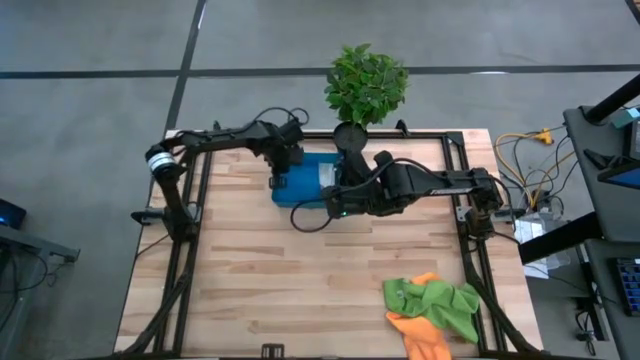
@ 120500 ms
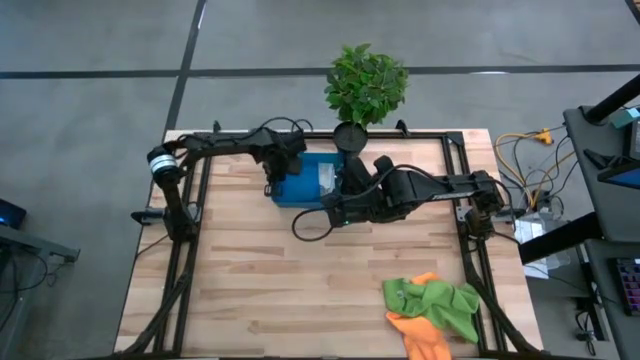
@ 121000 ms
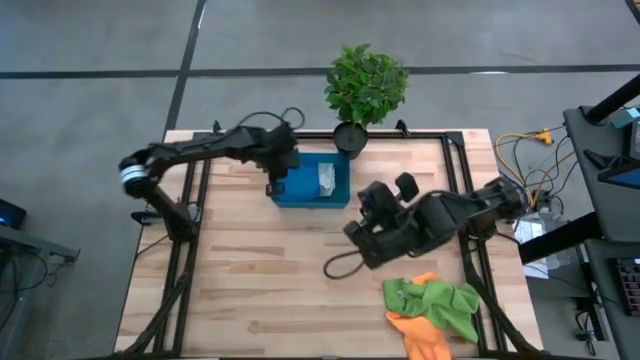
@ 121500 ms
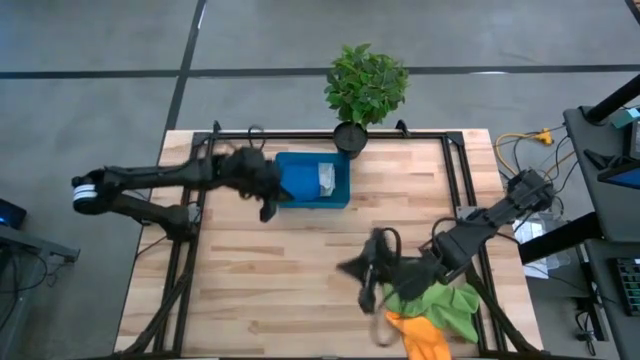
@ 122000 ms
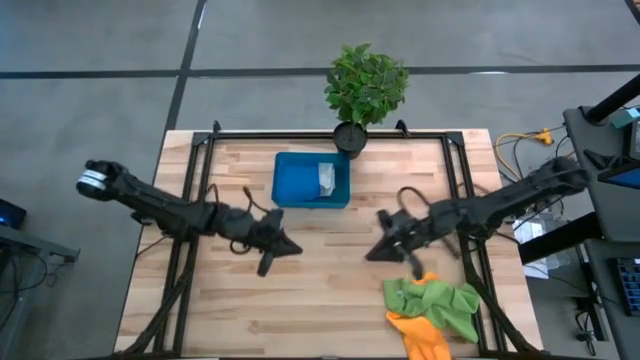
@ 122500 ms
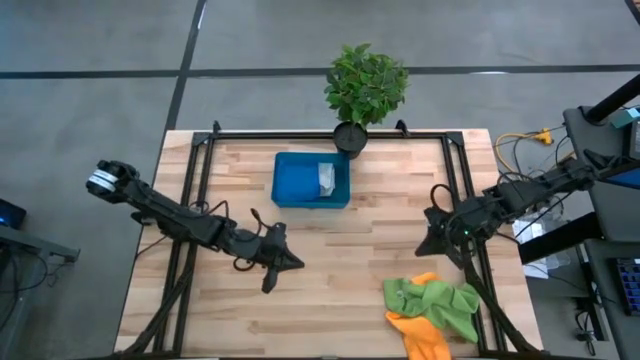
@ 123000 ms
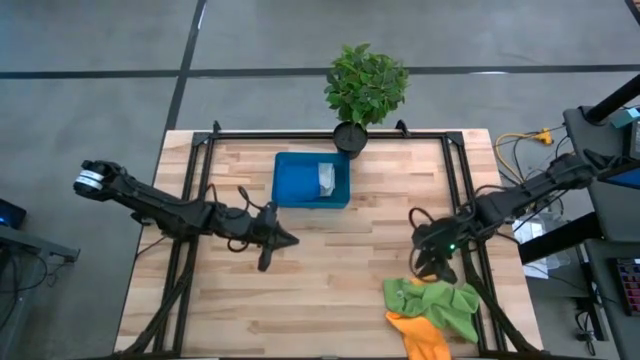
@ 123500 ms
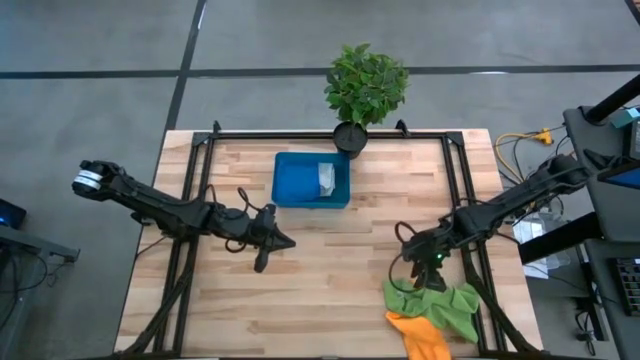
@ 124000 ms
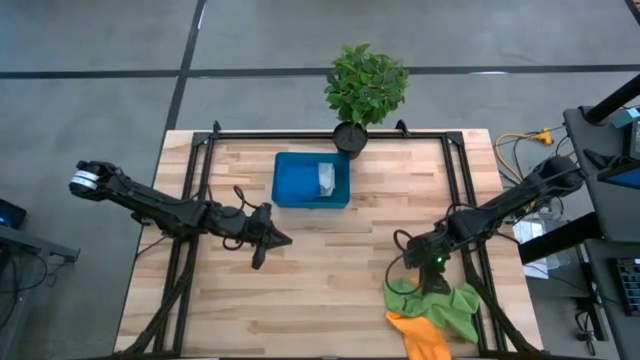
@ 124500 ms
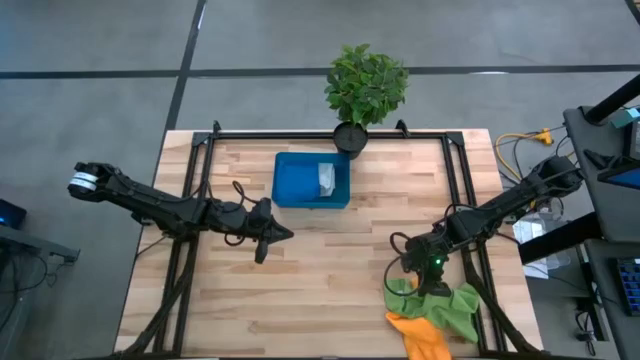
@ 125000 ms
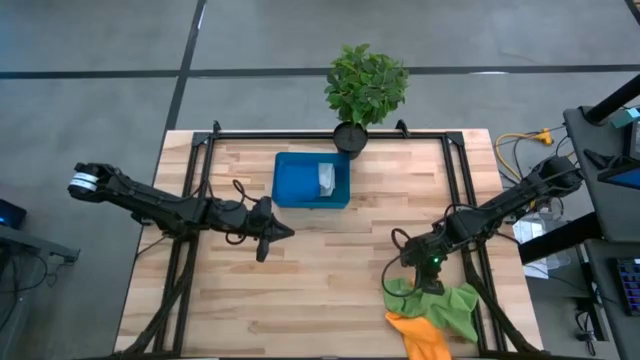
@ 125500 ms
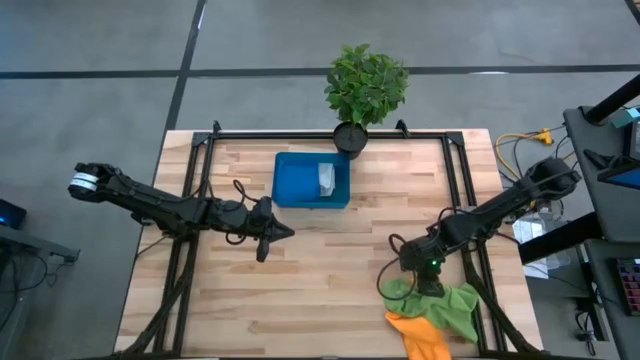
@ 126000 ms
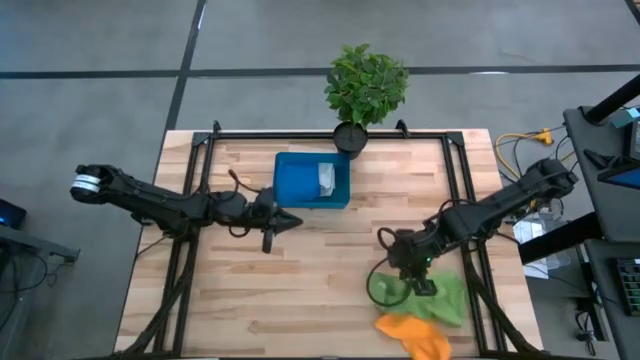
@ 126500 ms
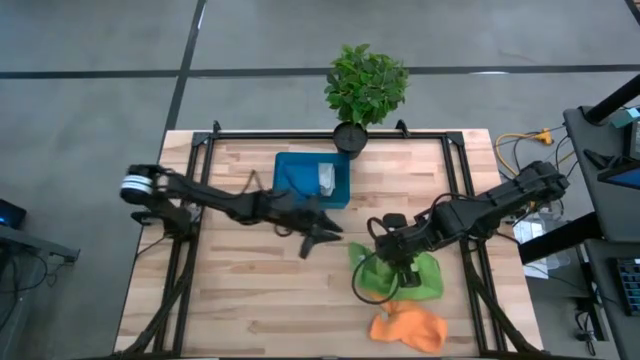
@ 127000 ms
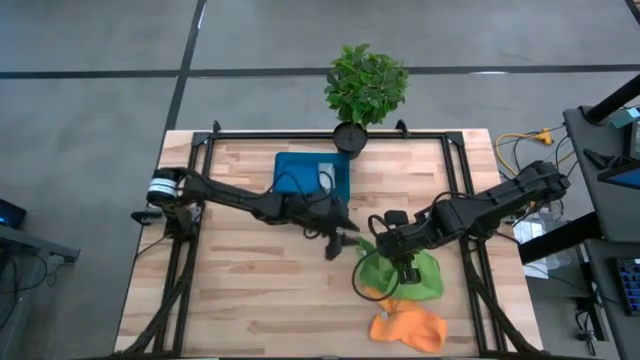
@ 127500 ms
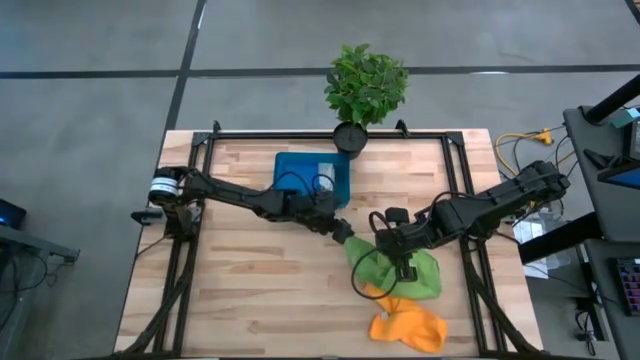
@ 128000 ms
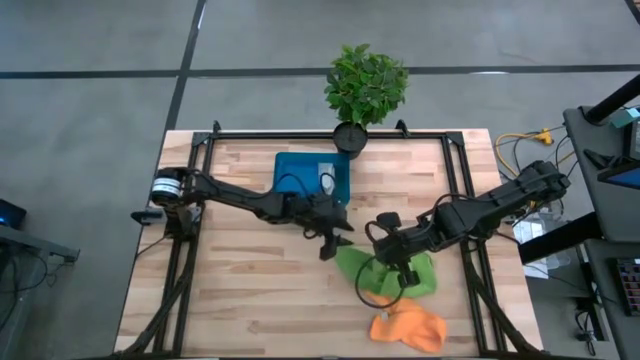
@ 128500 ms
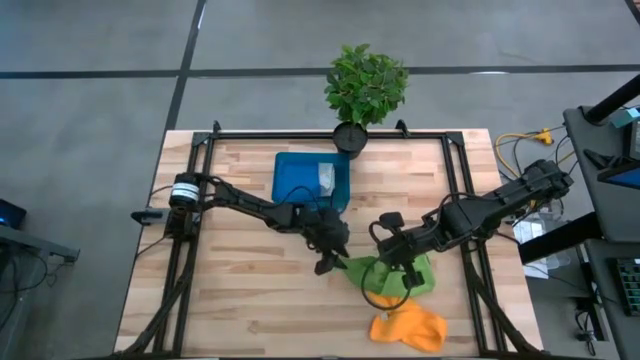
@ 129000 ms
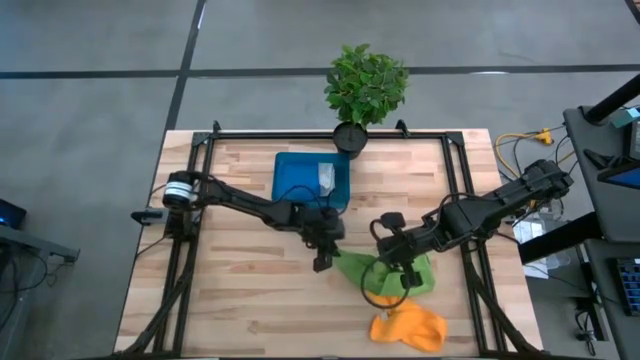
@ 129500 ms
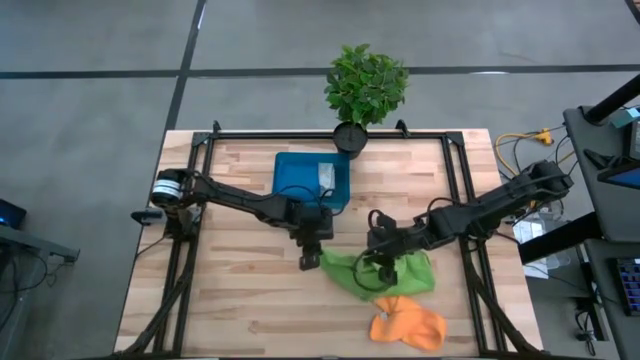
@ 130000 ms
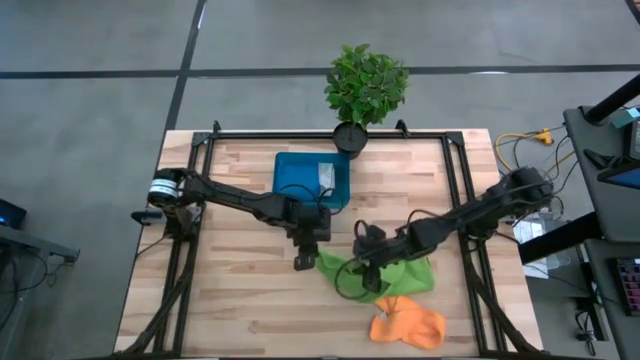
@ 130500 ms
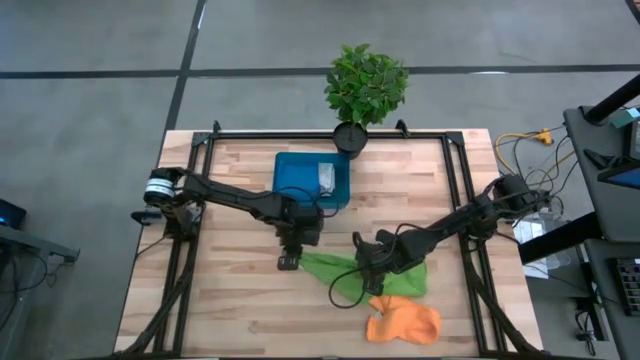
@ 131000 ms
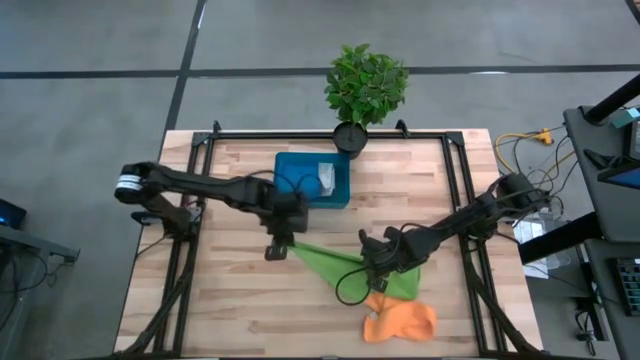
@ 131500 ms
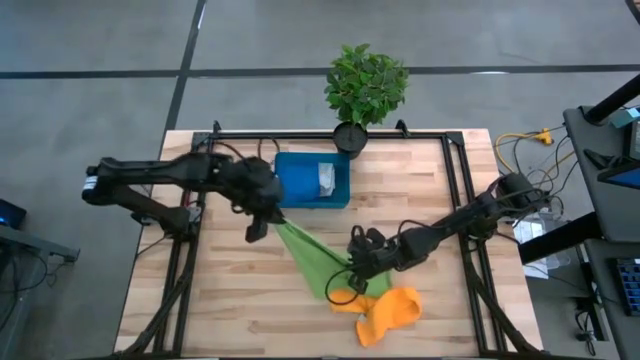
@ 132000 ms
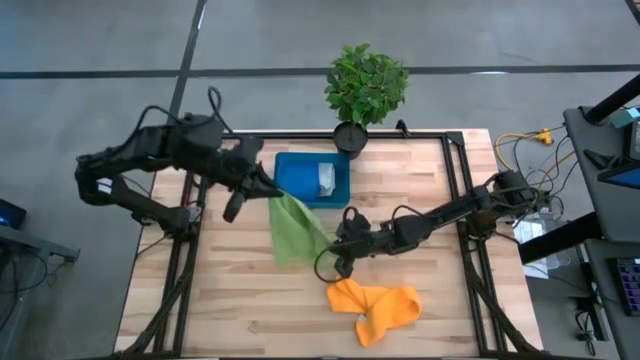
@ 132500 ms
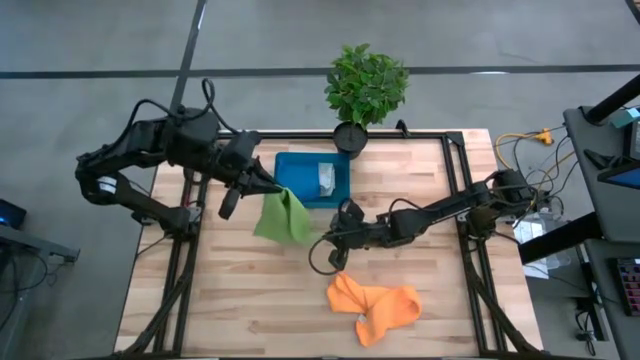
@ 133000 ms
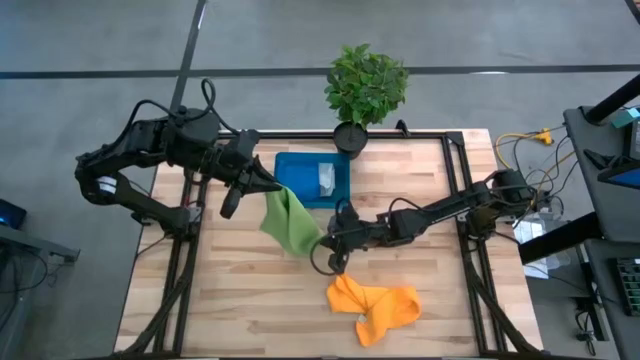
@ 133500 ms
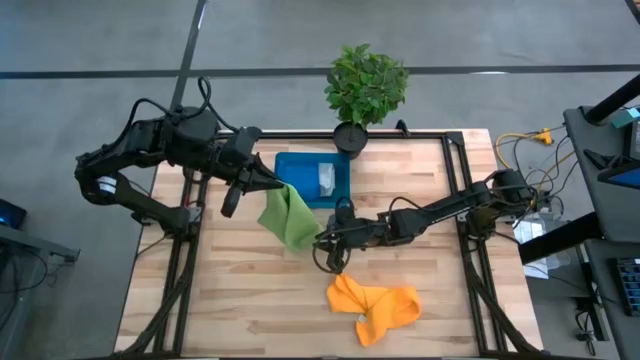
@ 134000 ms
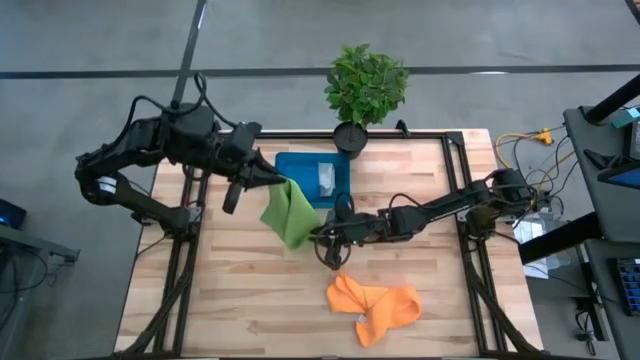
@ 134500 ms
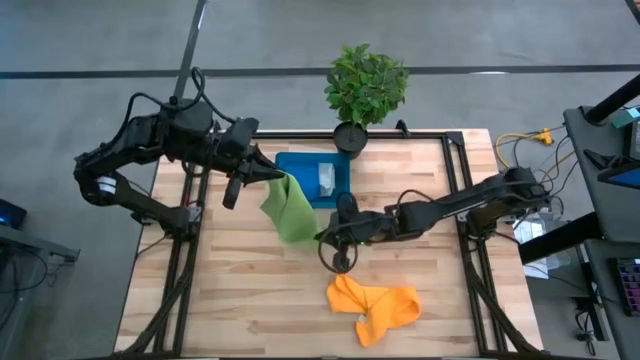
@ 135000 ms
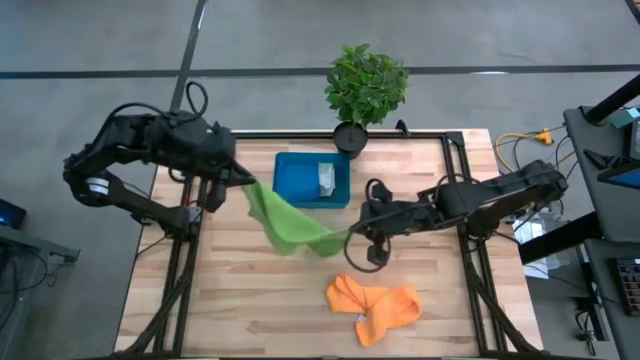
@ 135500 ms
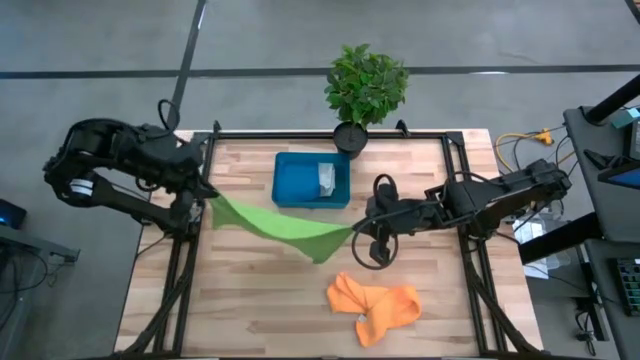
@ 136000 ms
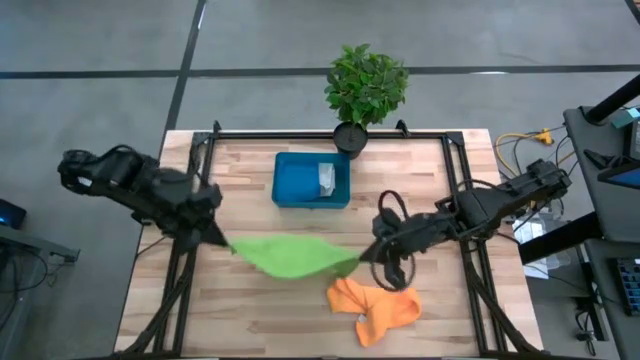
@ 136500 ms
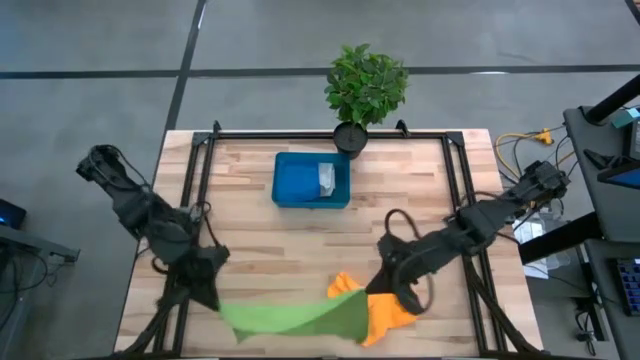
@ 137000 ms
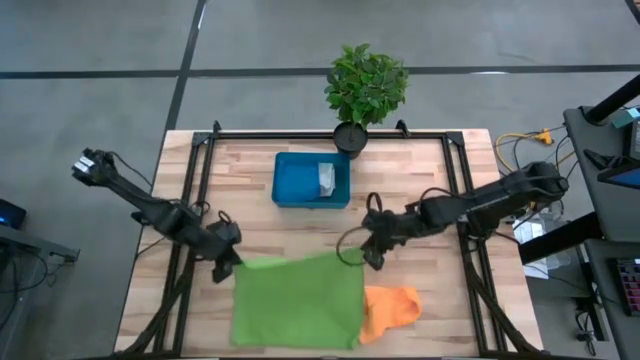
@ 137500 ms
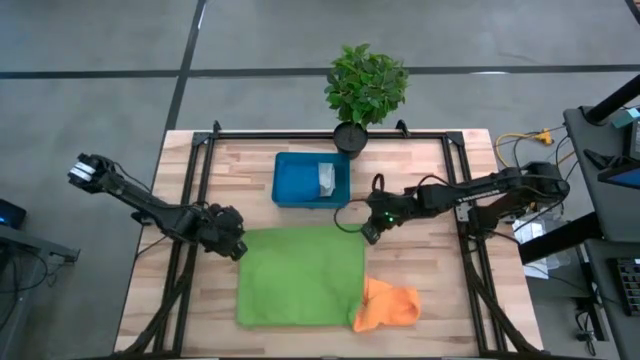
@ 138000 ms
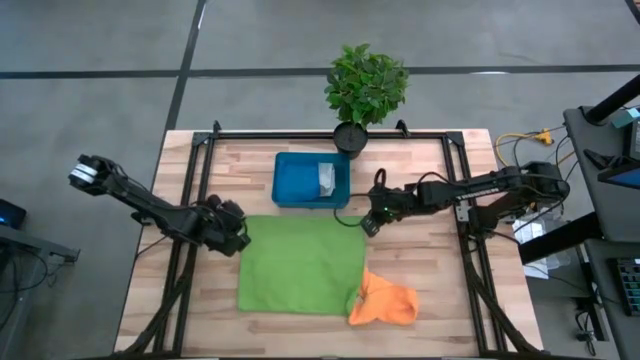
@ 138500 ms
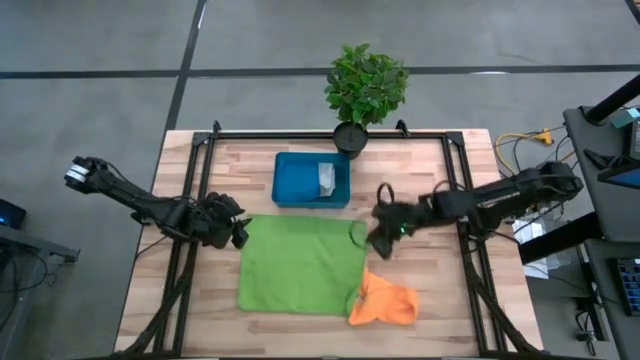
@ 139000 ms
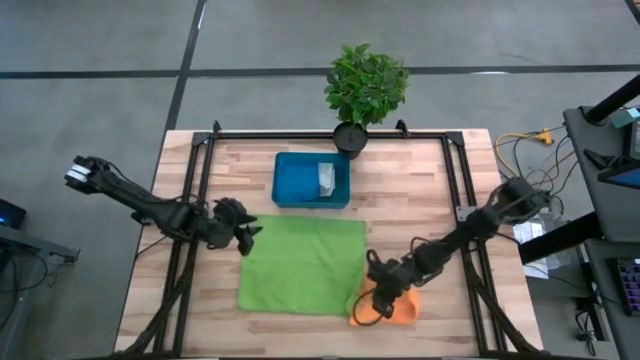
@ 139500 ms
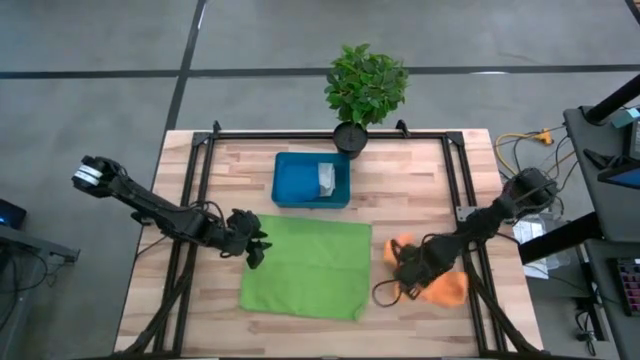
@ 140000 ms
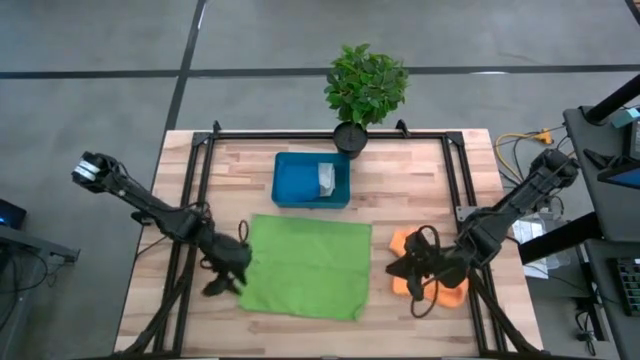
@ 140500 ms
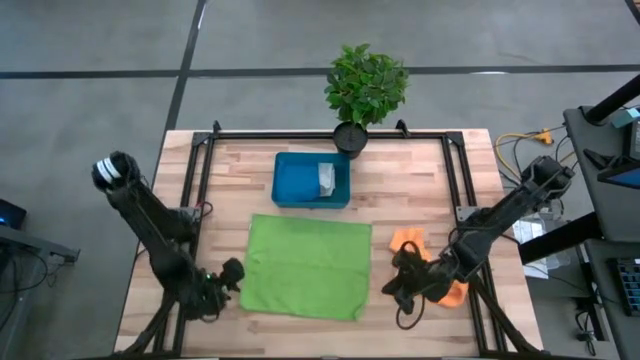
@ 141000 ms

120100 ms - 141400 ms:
Task: Fold microfiber towels
Fold the green microfiber towel
